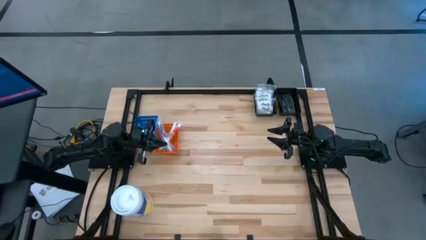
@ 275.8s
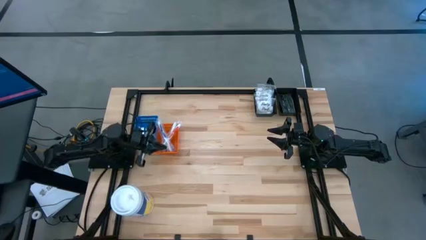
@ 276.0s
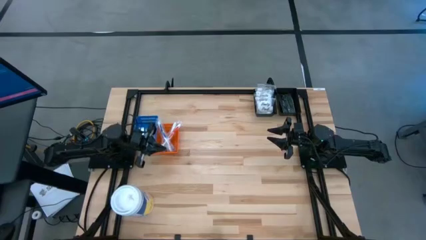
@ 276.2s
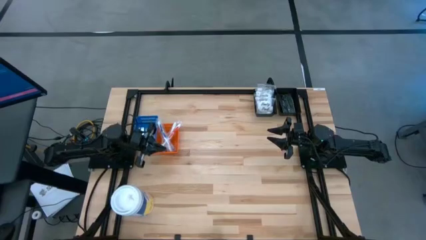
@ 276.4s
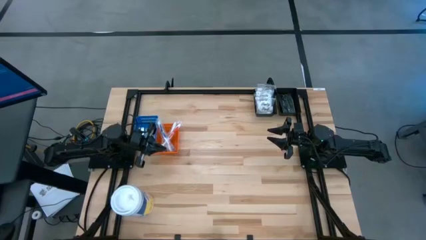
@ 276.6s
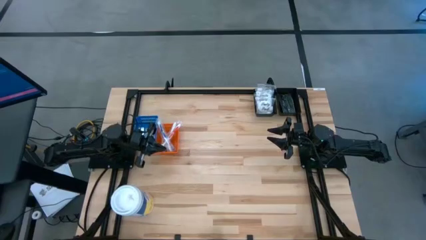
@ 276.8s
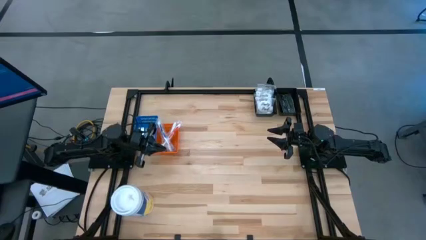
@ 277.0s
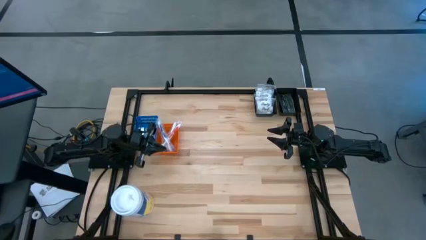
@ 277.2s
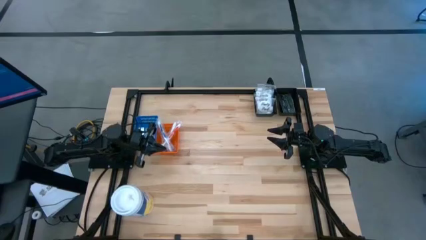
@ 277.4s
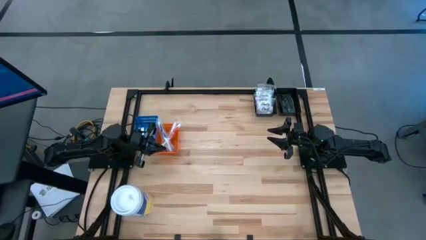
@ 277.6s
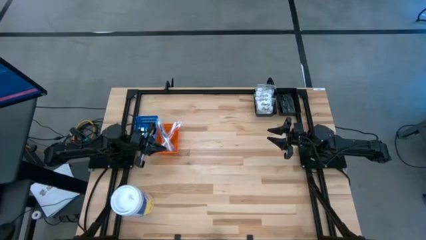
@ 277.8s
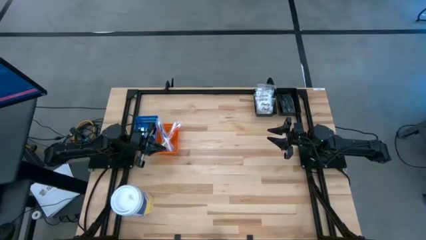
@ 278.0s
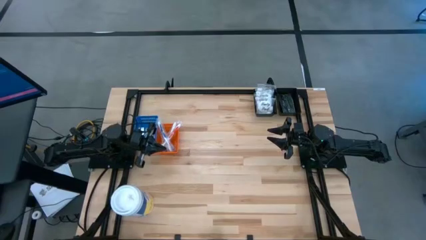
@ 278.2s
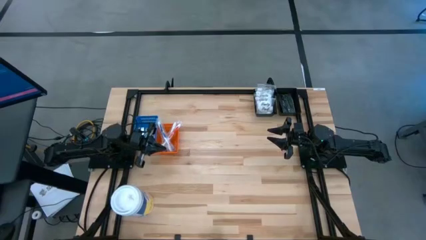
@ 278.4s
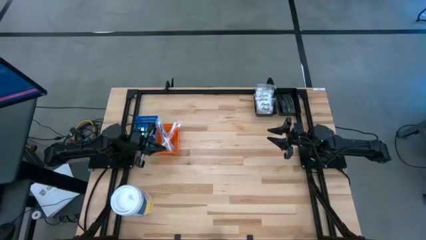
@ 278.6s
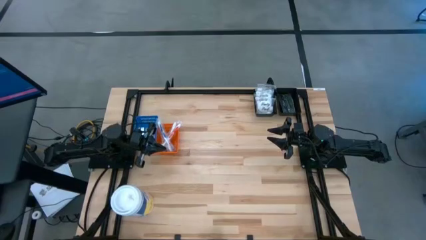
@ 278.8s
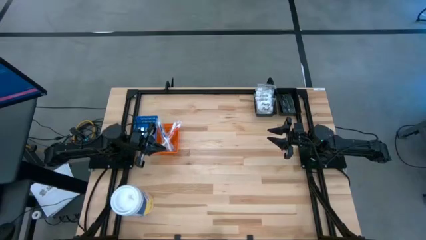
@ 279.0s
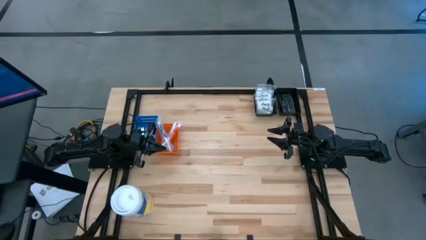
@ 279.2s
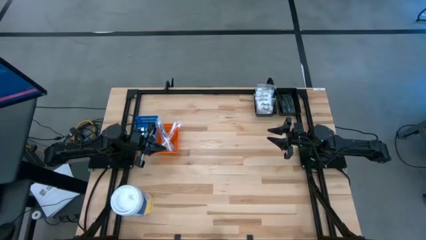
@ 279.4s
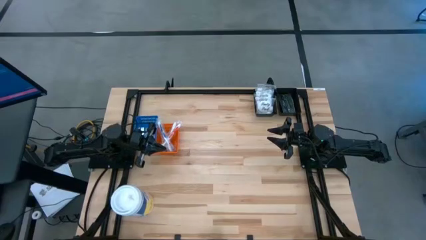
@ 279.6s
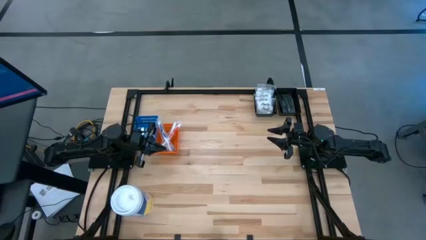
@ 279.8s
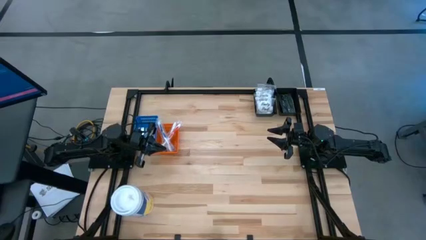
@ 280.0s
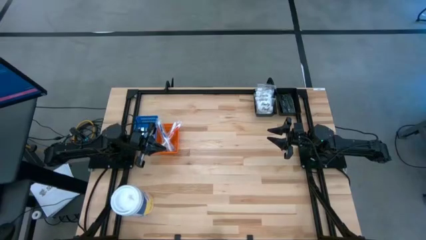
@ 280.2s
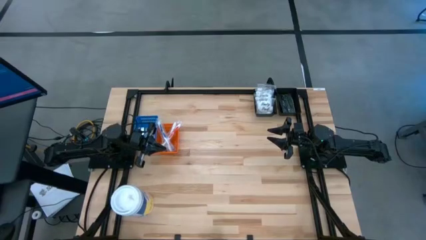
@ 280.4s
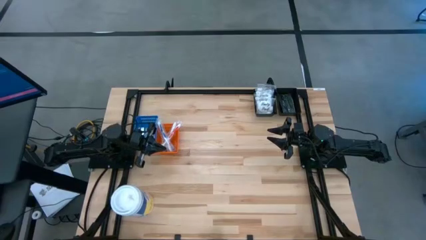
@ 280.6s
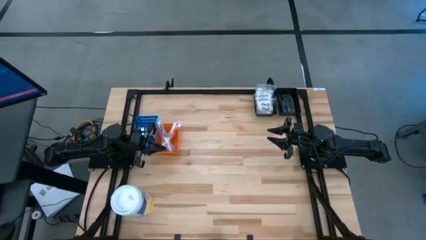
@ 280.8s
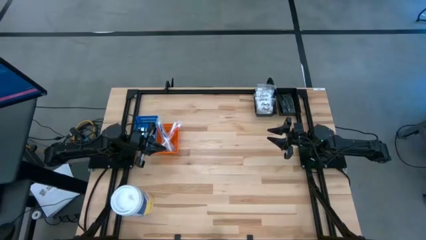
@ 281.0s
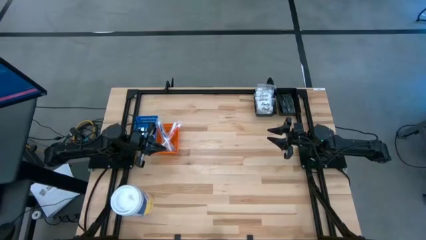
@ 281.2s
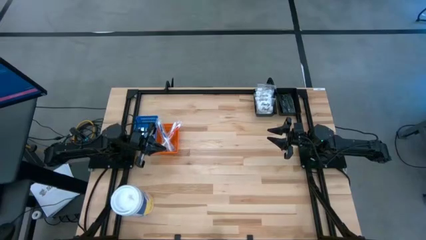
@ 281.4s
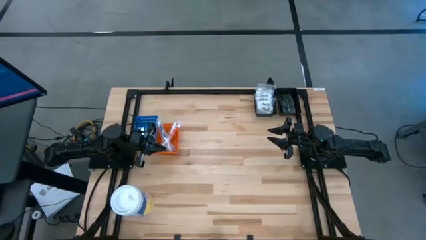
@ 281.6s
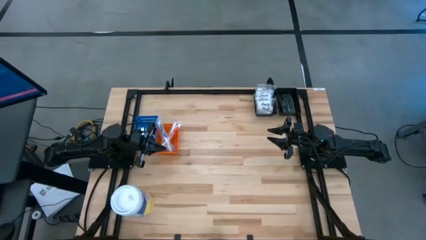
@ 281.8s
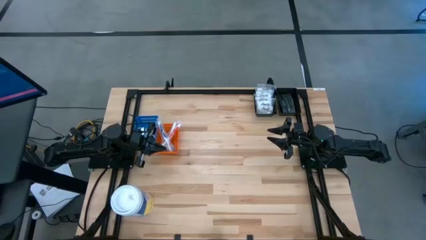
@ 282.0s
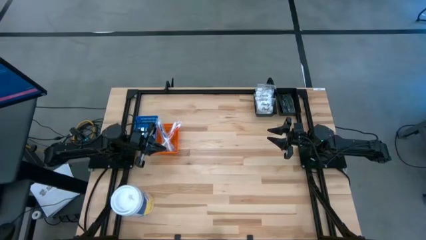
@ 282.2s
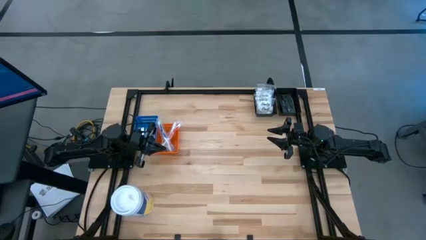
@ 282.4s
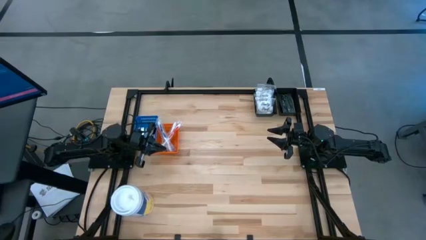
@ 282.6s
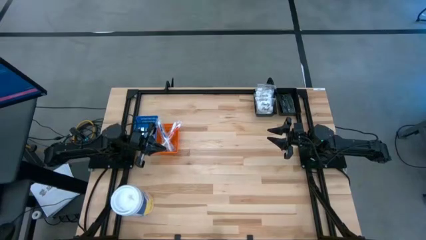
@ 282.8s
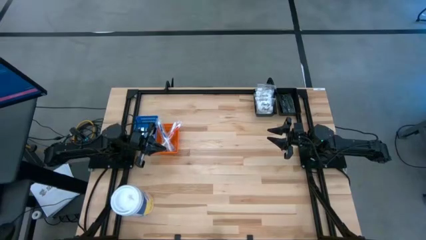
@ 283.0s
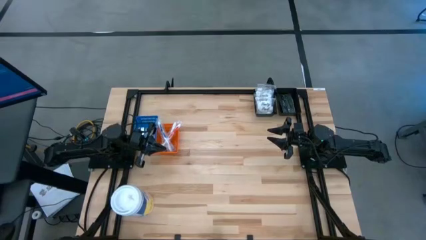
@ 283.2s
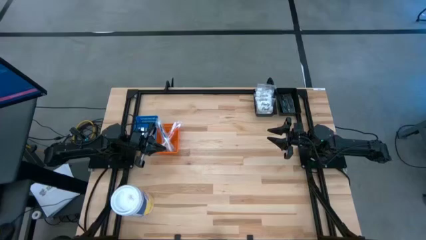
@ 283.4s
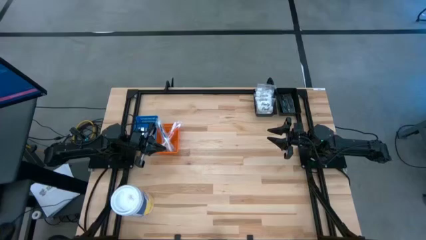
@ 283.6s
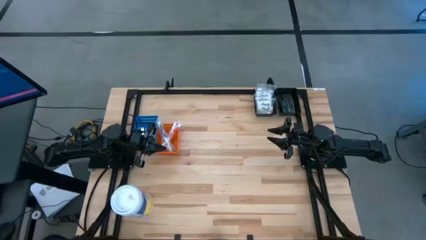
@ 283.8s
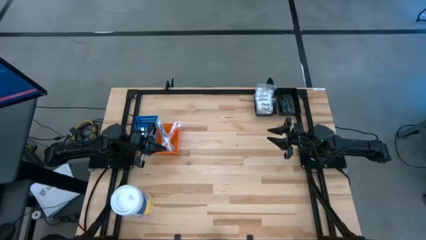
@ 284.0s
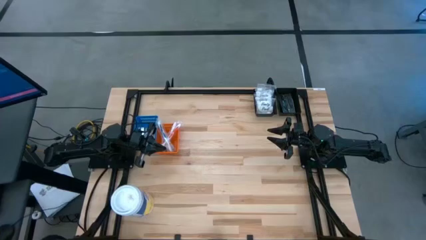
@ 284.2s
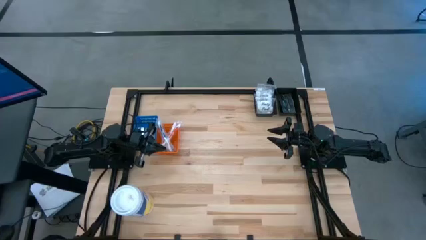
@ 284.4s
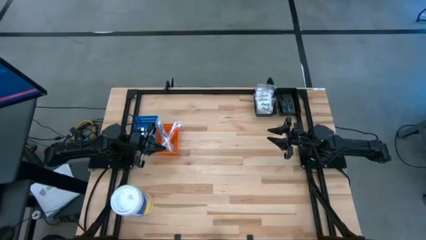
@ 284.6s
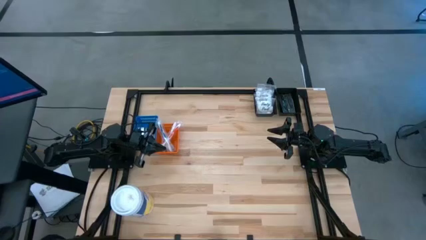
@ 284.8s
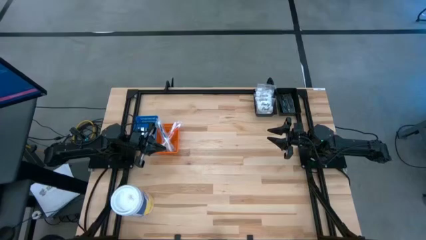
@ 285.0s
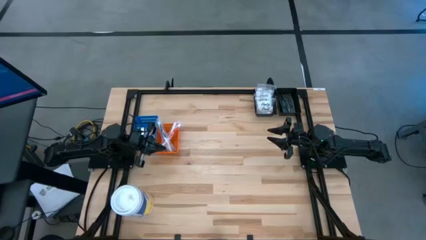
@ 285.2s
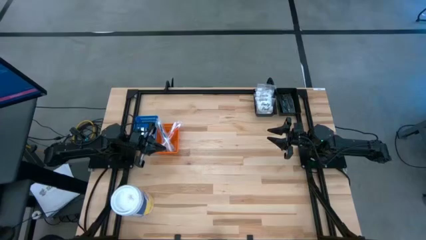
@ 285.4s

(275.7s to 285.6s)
Task: Pick & Place Travel size toiletries
Return to Home Position

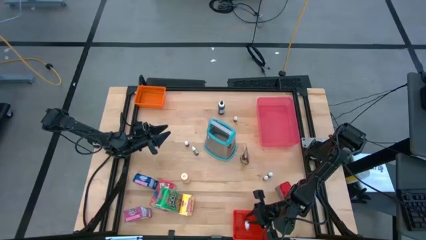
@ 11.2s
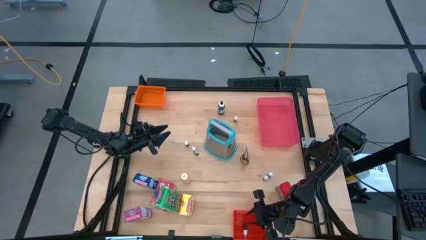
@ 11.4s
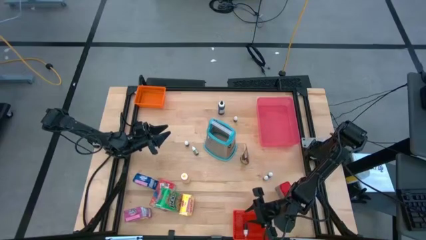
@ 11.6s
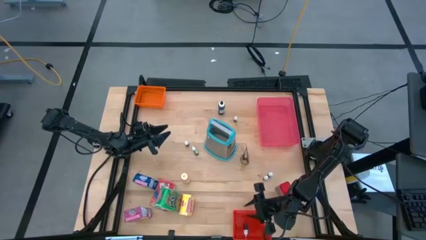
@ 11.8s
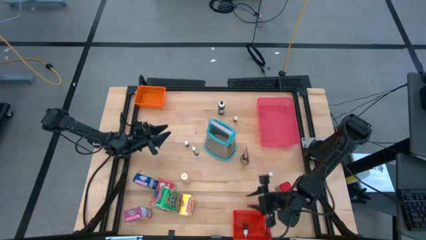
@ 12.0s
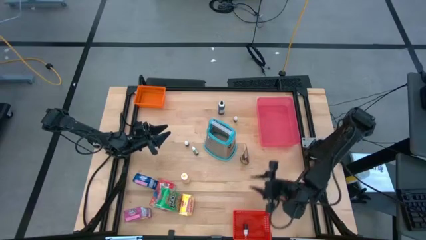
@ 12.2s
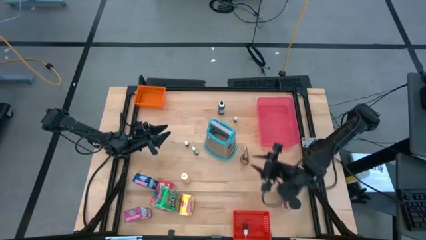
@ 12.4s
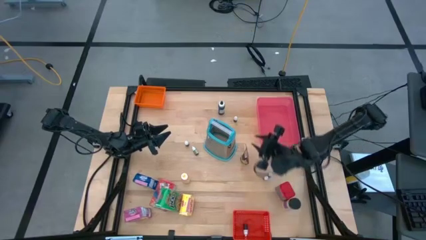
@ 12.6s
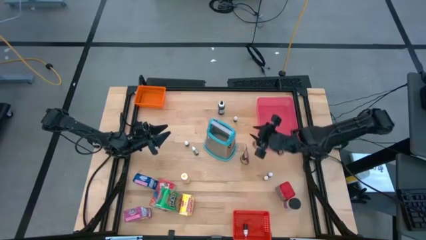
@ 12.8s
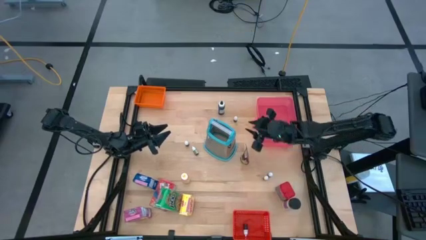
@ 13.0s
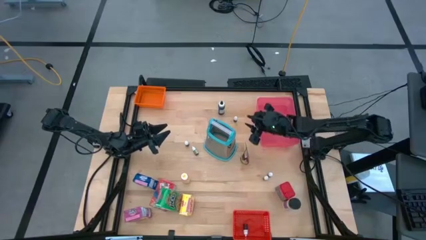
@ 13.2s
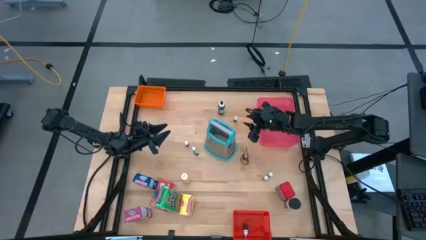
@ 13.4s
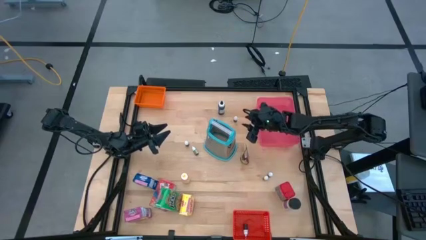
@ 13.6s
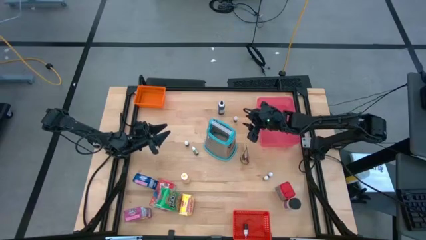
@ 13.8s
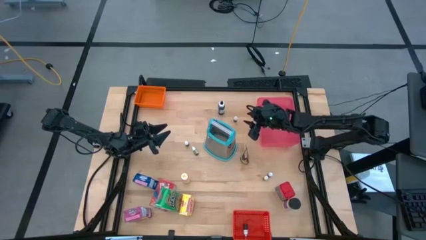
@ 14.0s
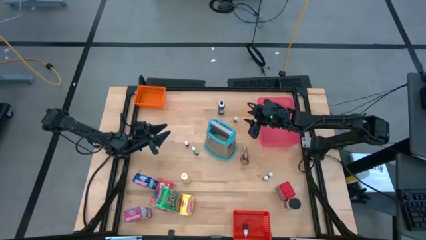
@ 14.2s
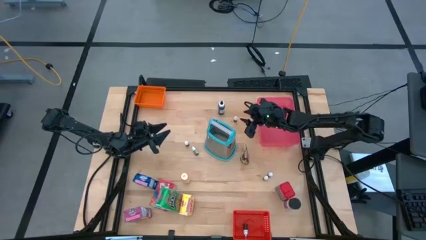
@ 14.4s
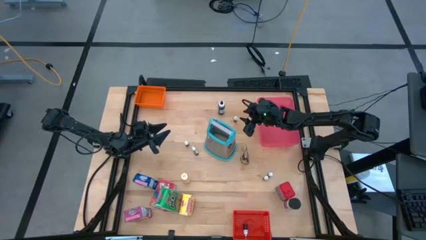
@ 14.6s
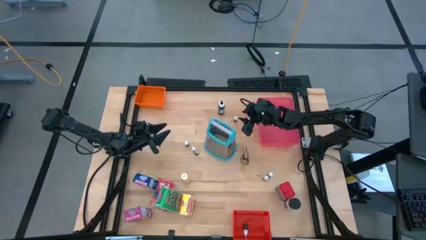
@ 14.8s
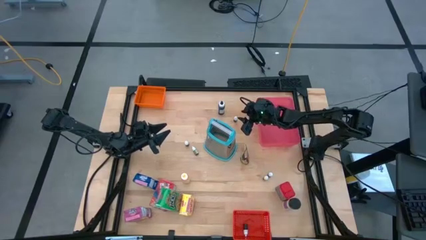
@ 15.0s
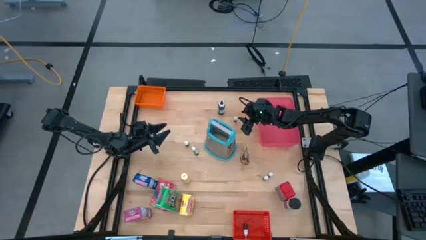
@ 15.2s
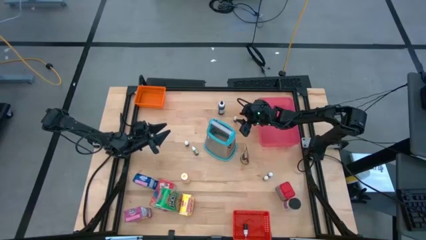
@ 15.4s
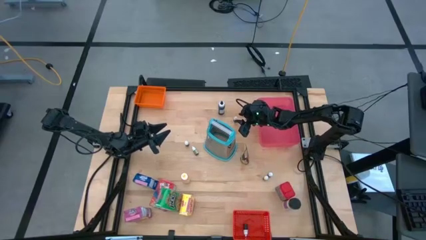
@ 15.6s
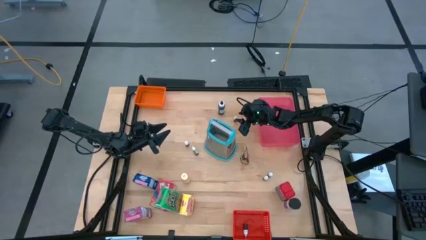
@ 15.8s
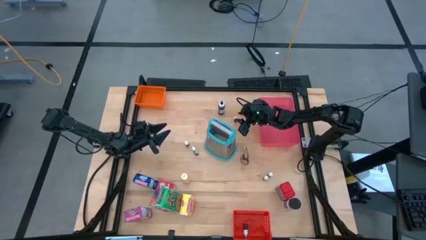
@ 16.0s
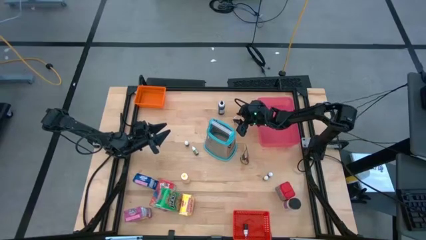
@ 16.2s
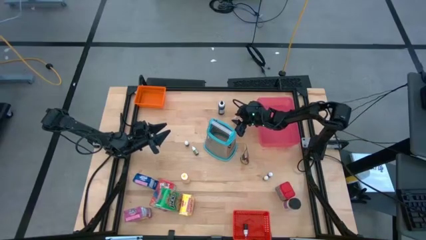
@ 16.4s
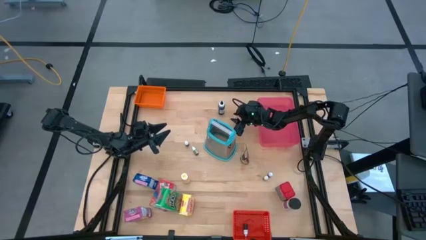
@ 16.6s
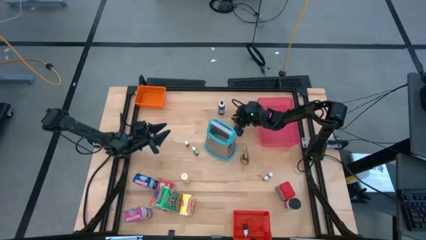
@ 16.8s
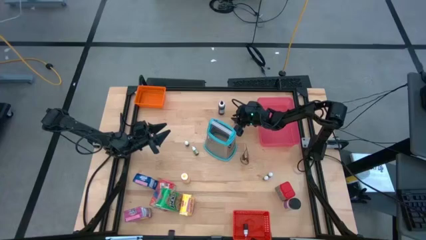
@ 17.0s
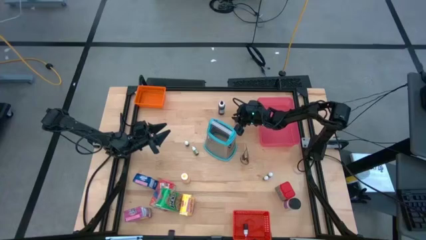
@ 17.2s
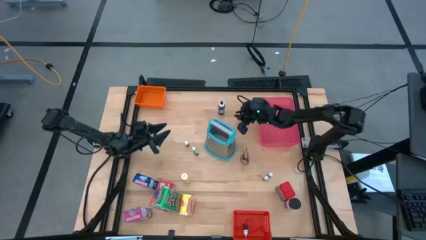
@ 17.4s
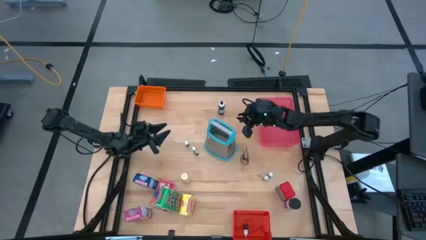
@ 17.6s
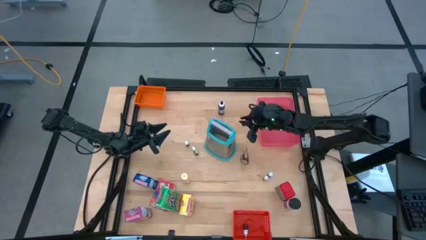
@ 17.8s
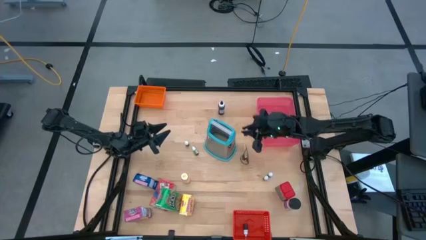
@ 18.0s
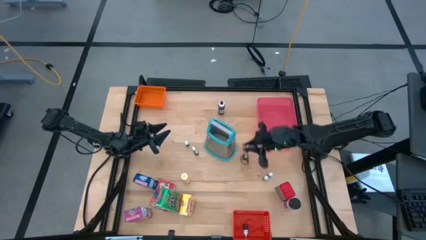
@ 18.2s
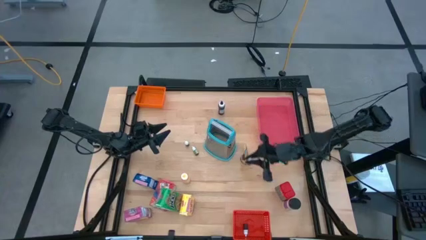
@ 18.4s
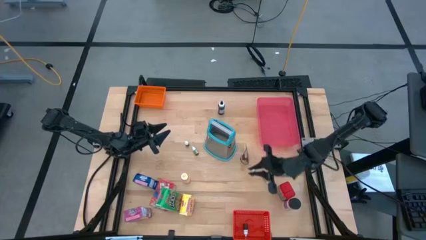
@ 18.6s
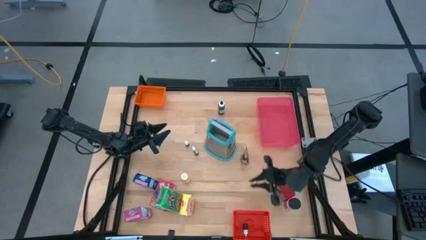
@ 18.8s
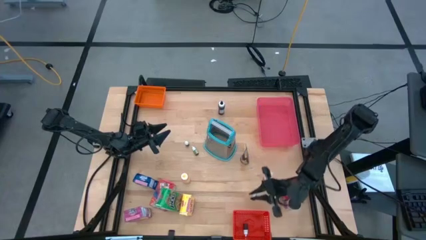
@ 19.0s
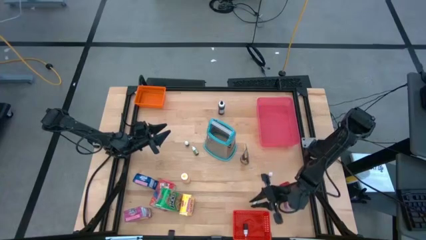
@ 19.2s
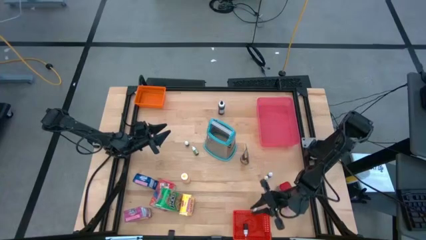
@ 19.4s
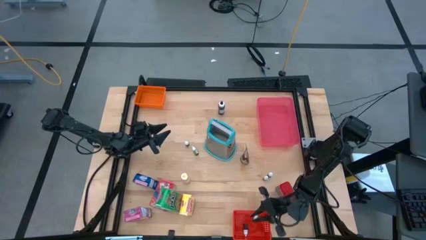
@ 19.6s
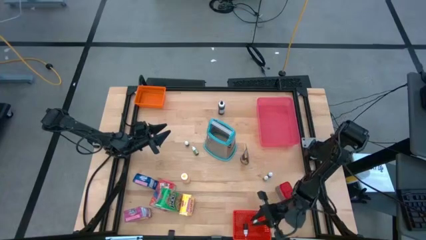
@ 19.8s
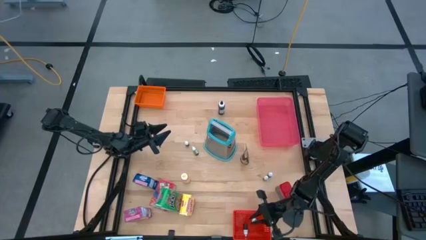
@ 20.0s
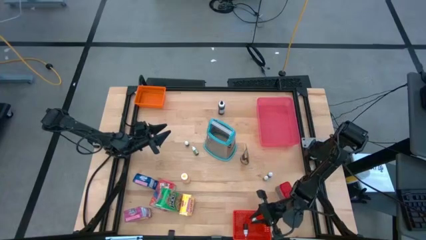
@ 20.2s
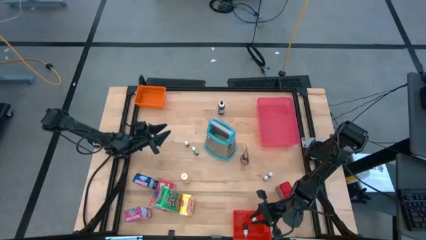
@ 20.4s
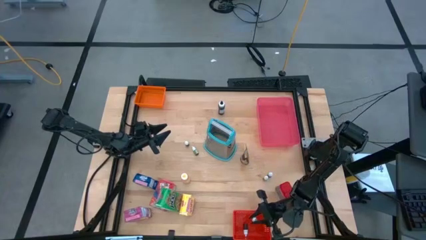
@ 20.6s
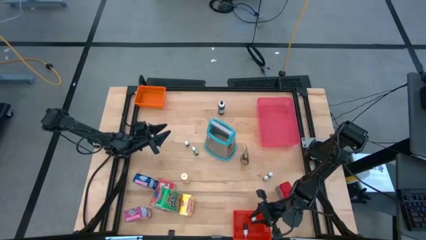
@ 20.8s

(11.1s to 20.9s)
Task: Pick & Place Kitchen Items
Put the small brown food coloring bottle into the red bin
